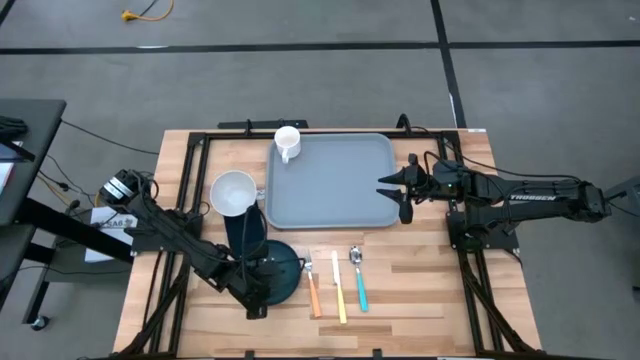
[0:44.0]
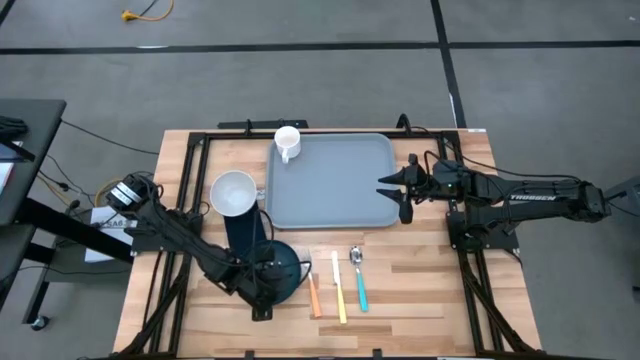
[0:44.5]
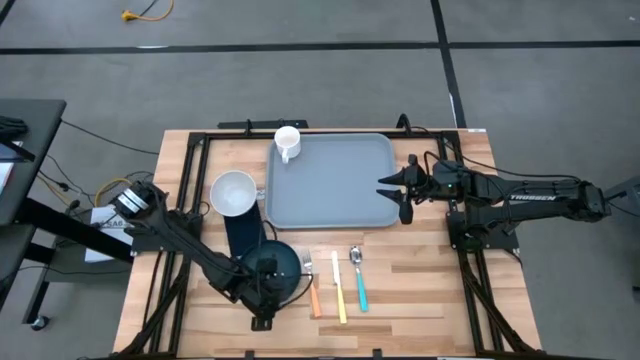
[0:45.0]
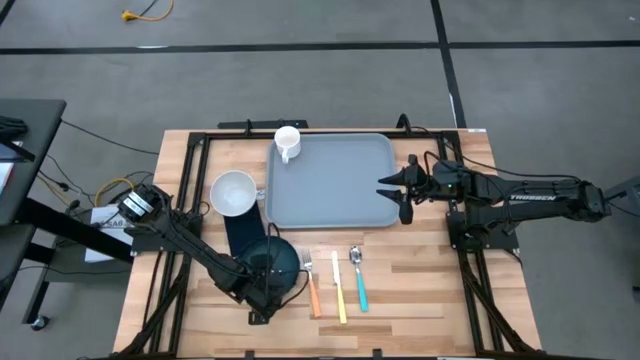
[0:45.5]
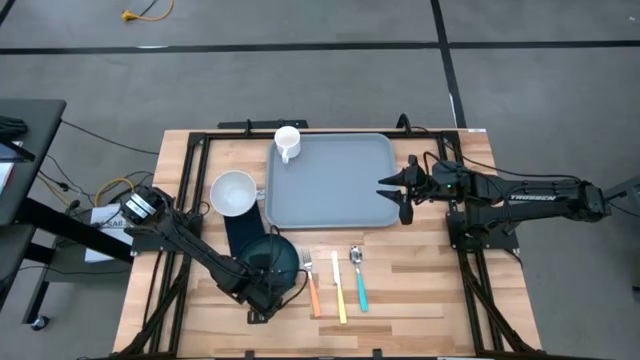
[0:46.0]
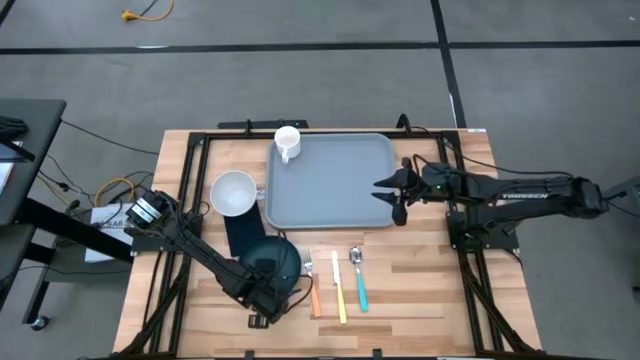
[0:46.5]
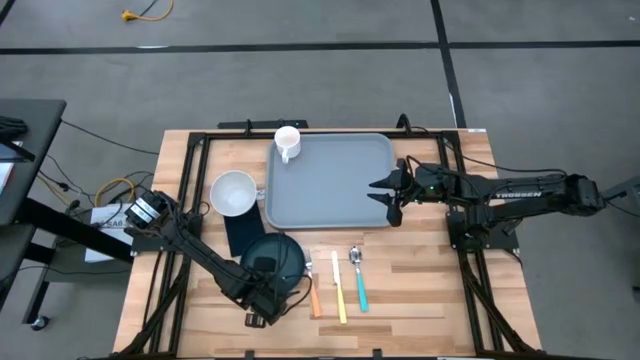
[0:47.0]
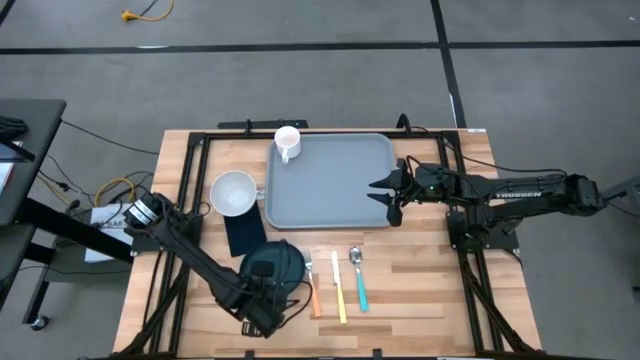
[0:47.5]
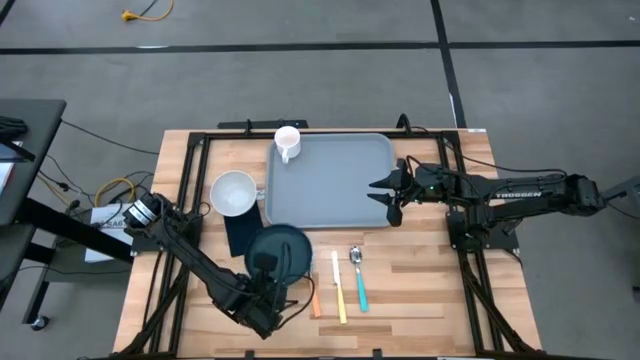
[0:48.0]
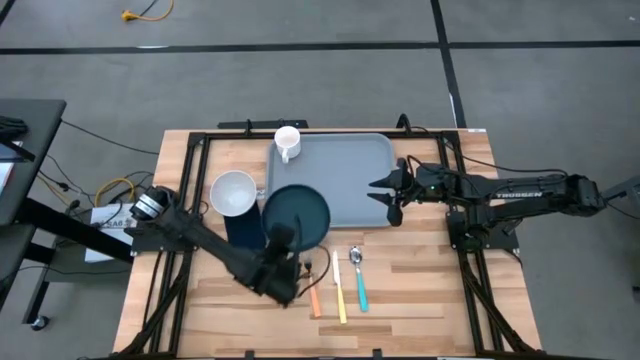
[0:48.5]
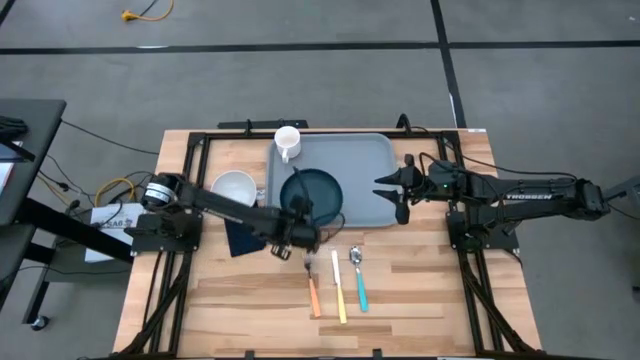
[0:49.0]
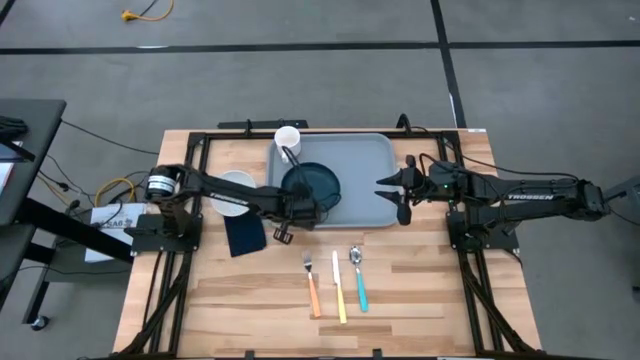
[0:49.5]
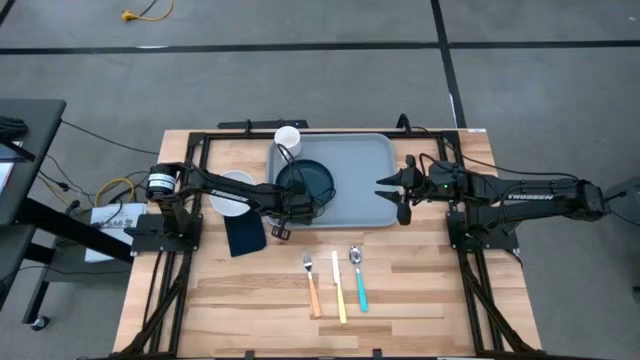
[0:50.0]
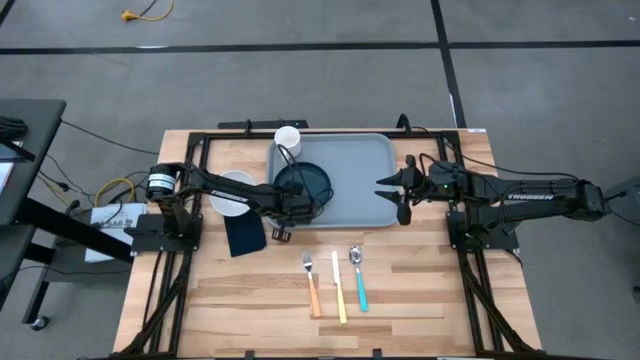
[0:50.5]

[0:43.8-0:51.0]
Task: Set up tray
Put the dark green plate on the tray to the bottom of the white mug

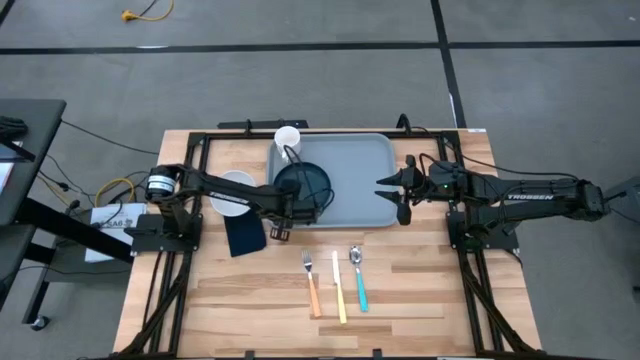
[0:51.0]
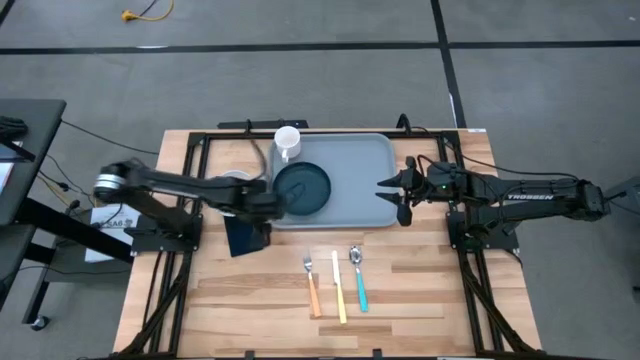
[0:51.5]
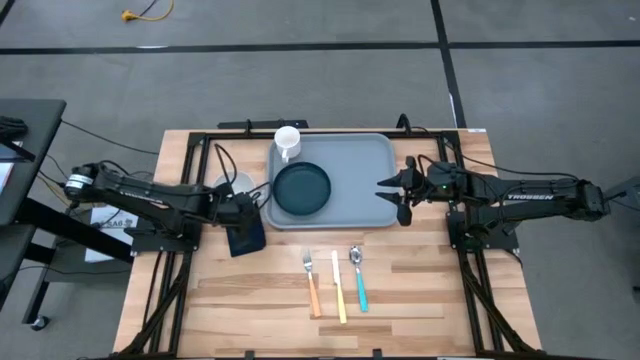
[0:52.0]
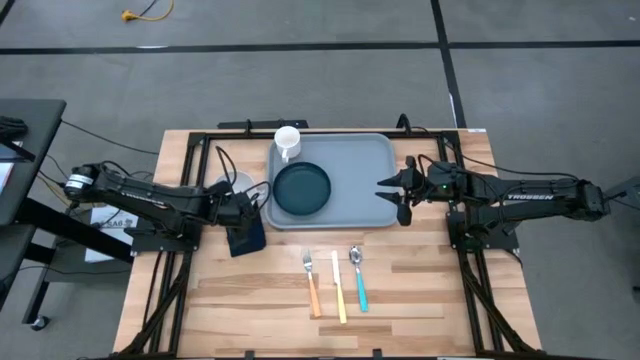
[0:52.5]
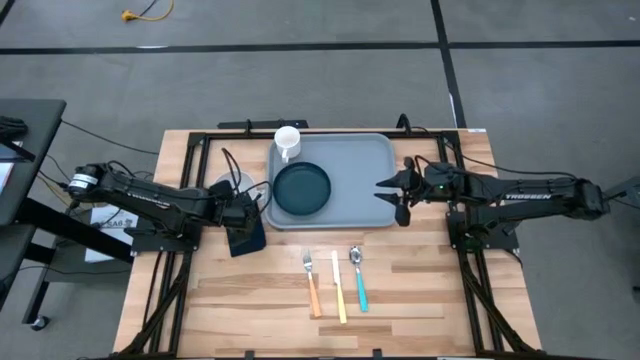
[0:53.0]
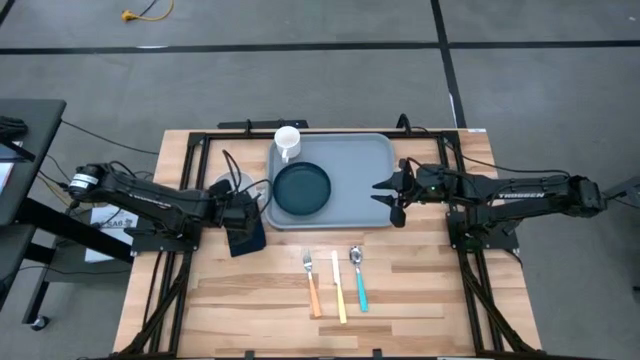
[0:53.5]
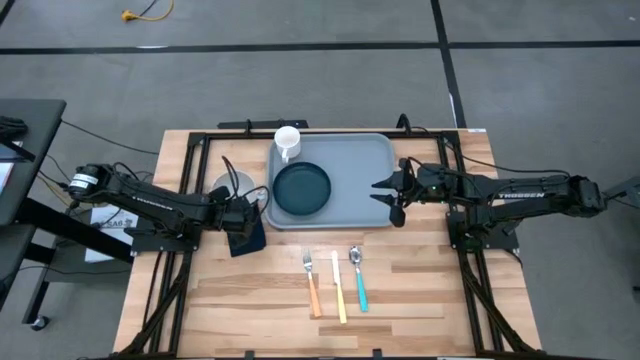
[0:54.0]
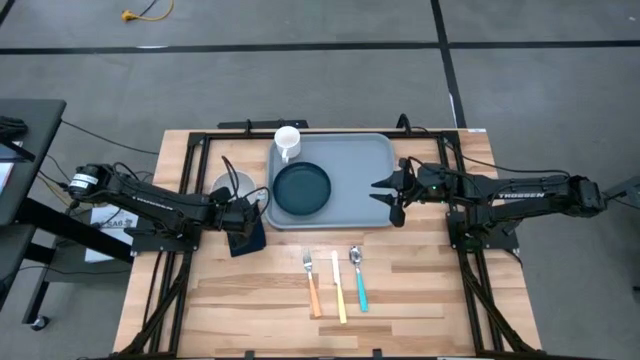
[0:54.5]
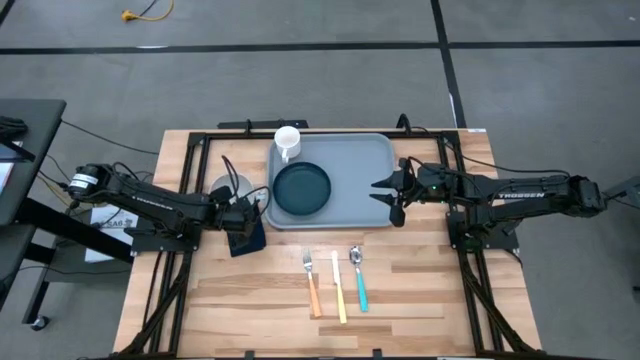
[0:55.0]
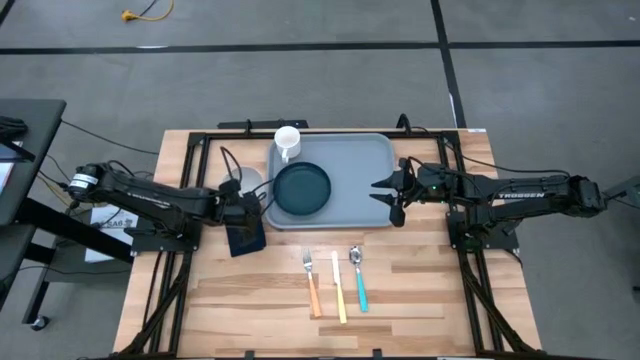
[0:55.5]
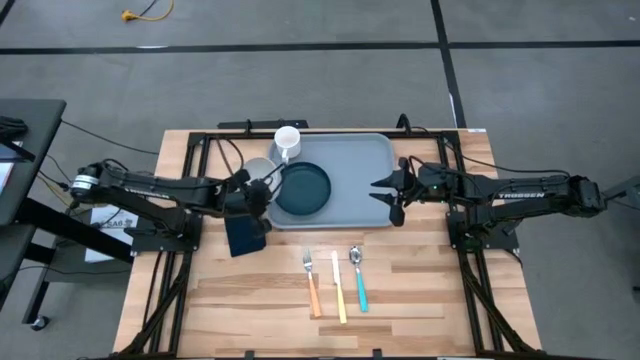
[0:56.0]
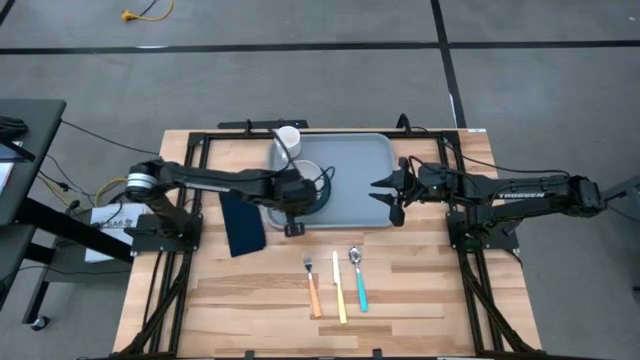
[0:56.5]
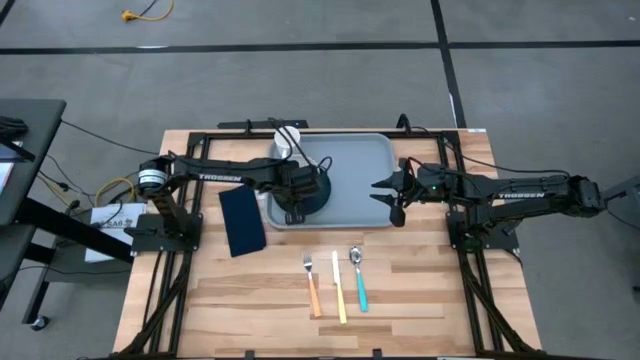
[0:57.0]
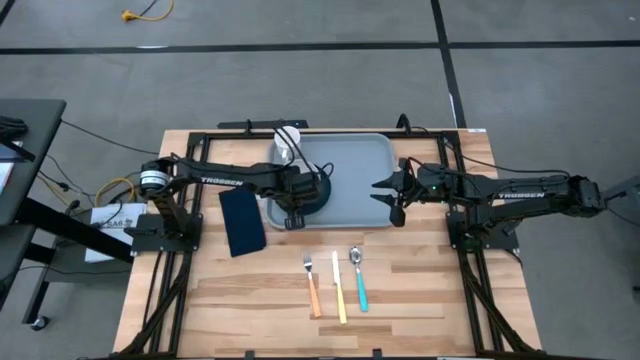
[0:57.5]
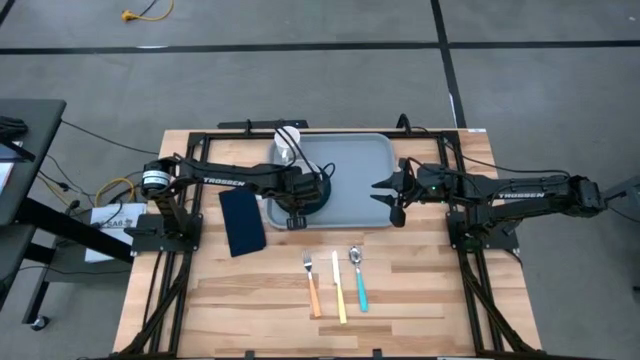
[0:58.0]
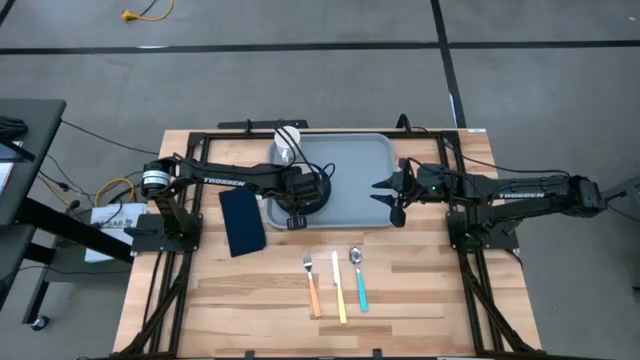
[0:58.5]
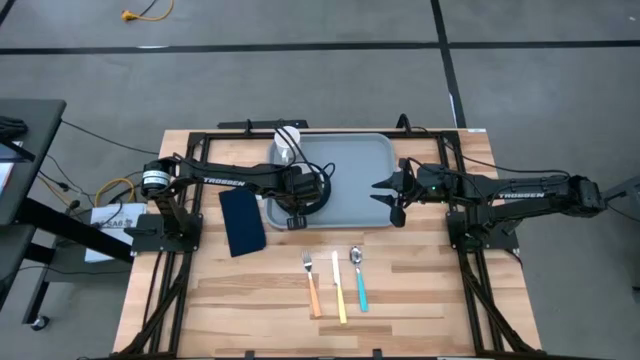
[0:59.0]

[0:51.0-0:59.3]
Put the bowl on top of the dark green plate

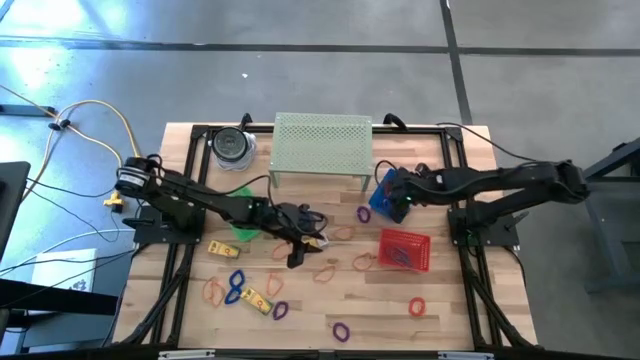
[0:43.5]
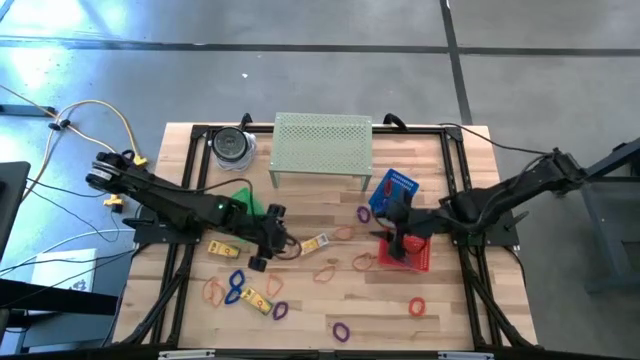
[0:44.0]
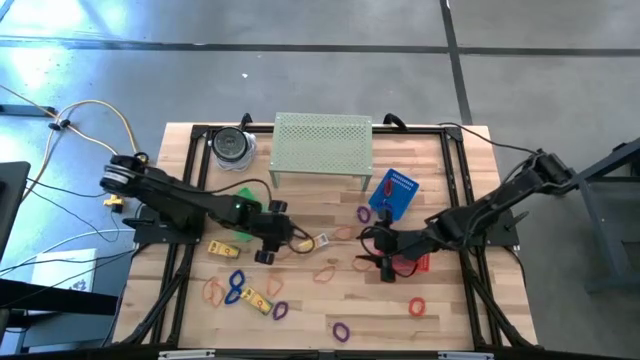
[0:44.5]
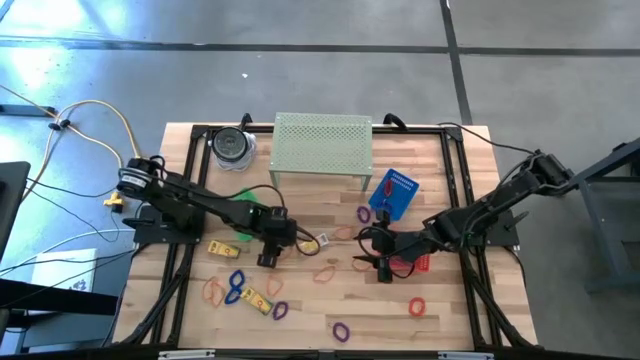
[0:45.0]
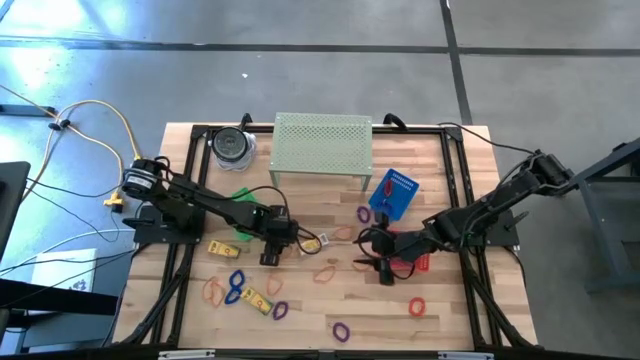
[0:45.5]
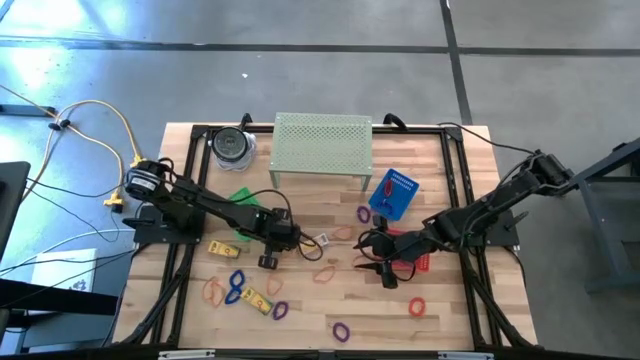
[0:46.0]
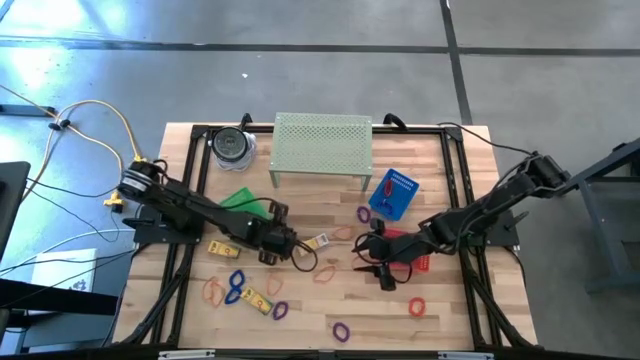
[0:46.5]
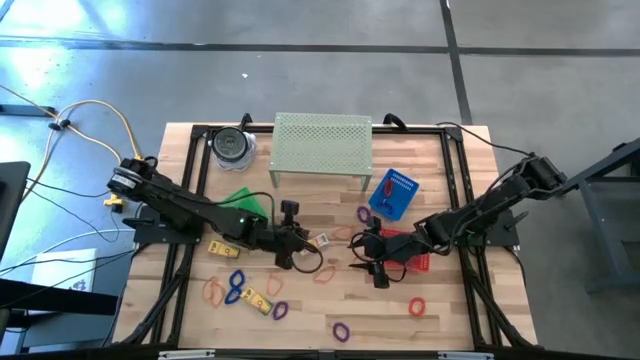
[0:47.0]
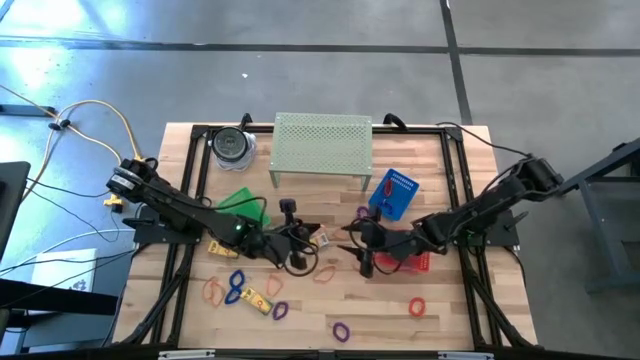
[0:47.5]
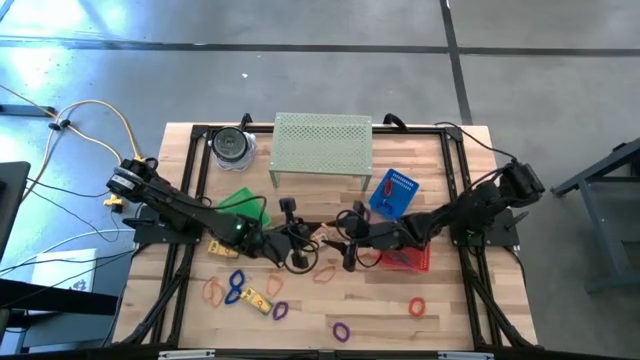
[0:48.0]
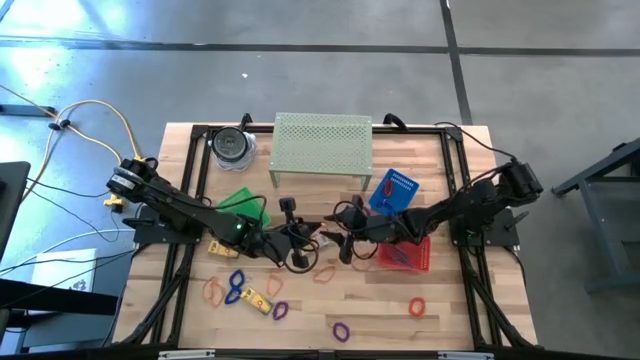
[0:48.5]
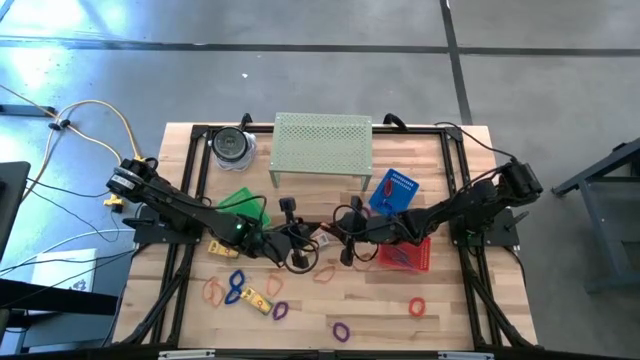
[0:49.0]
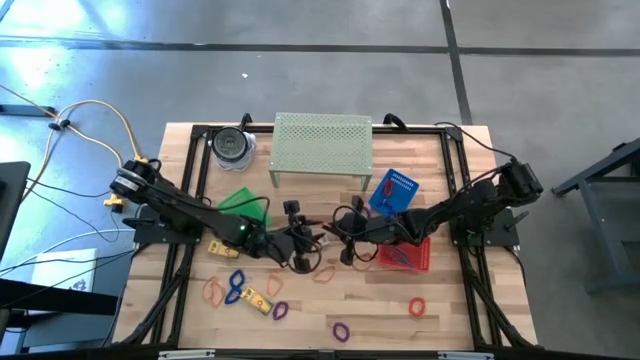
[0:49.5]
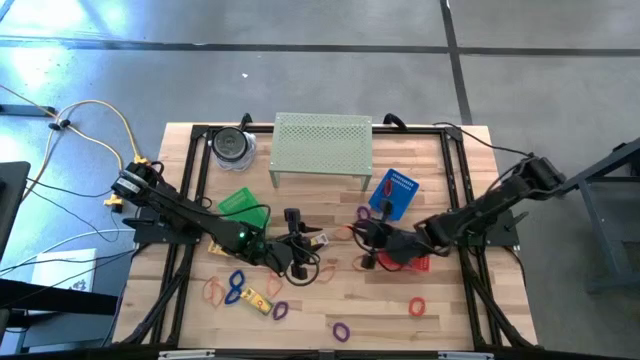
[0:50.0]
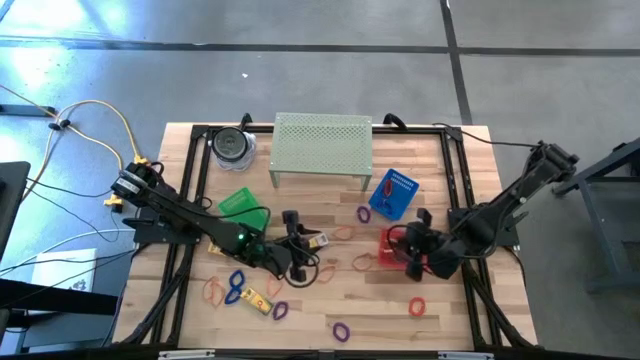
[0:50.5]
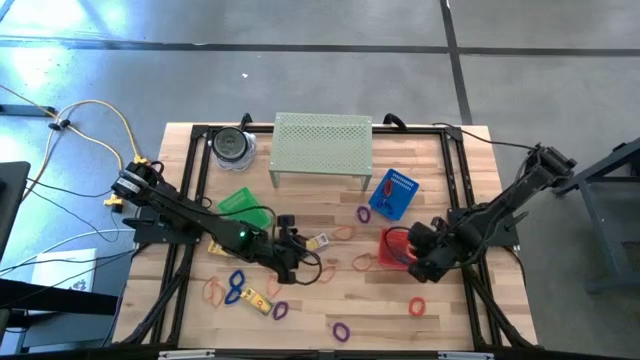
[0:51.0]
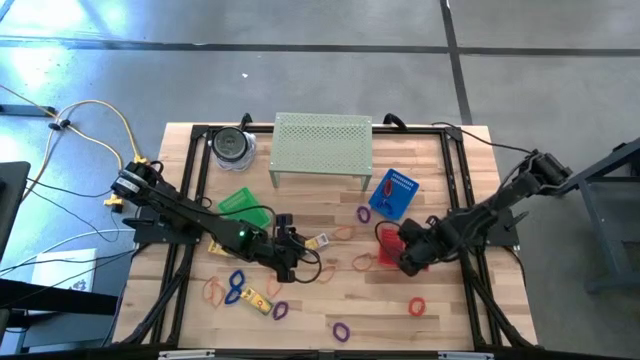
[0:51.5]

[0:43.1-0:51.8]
Task: Pick & Place Office Desk Supplies
Put the orange rubberband into the red basket
